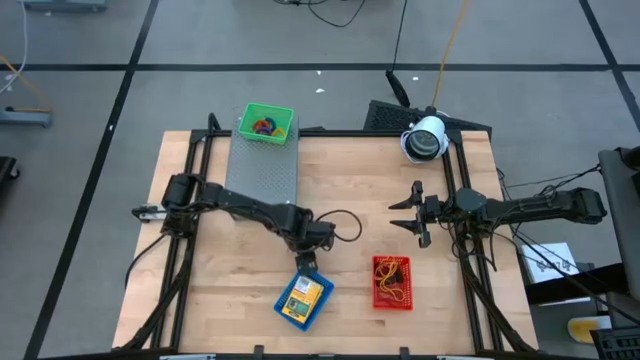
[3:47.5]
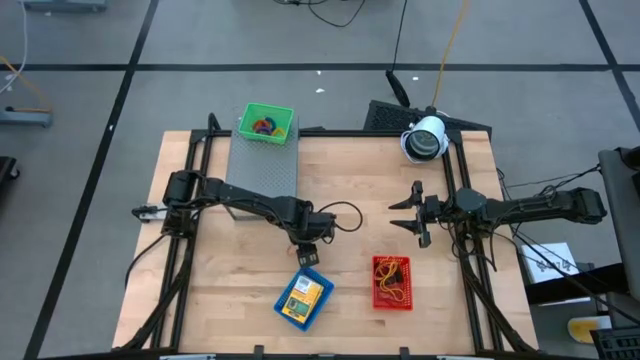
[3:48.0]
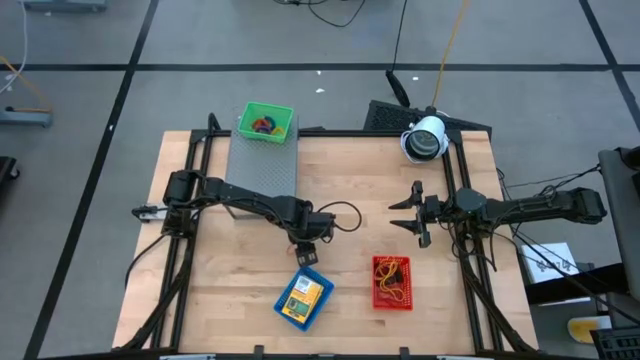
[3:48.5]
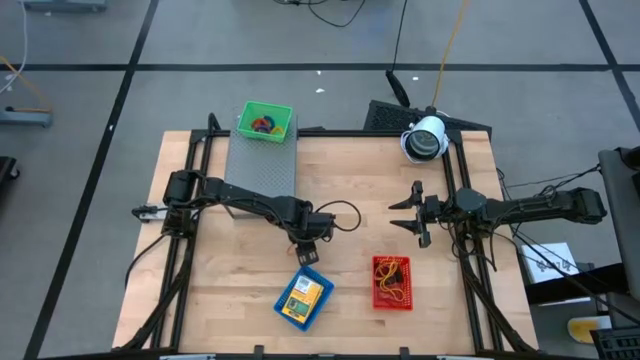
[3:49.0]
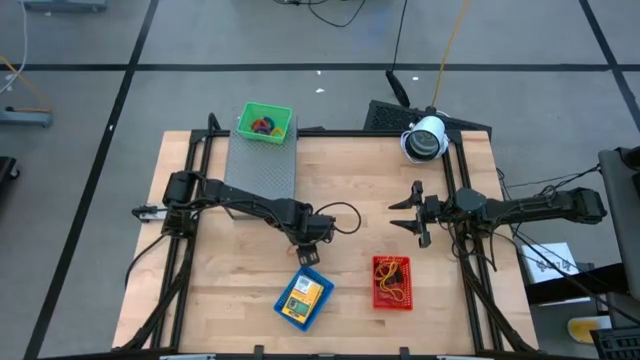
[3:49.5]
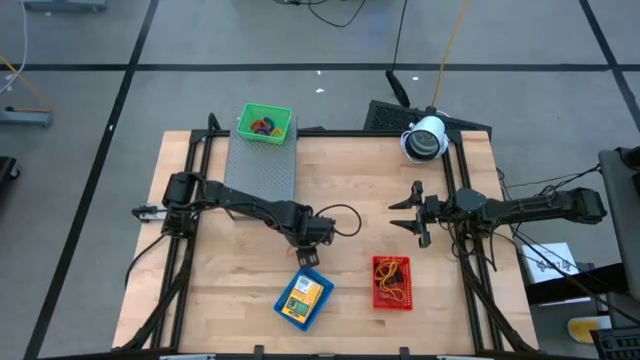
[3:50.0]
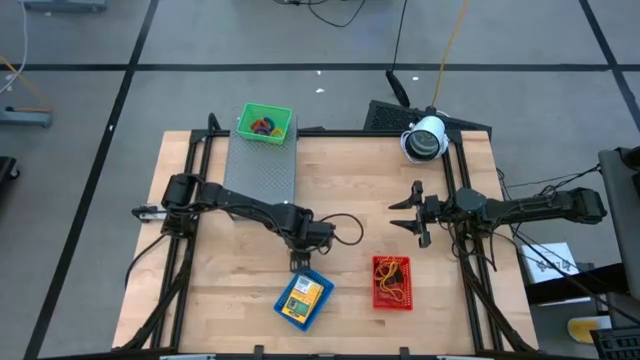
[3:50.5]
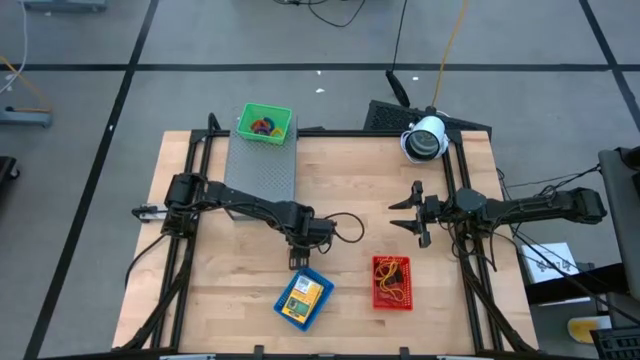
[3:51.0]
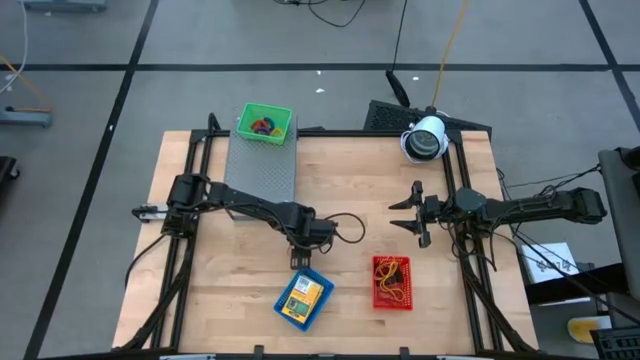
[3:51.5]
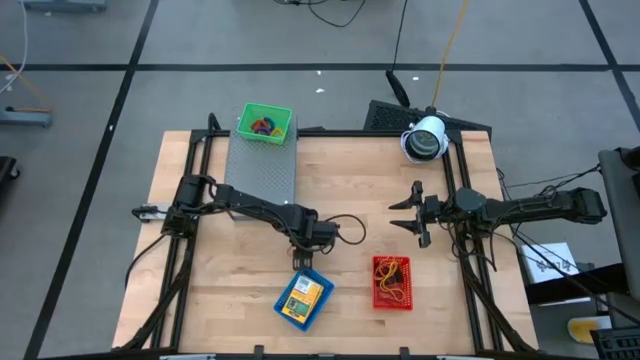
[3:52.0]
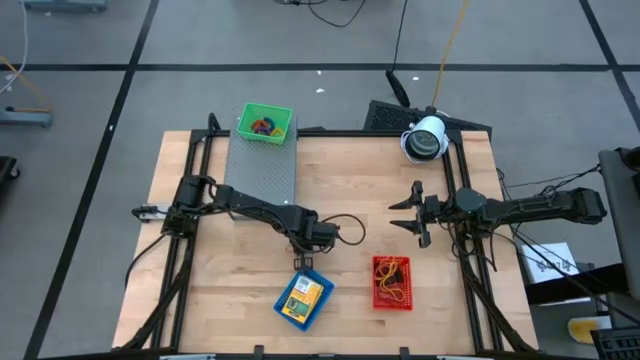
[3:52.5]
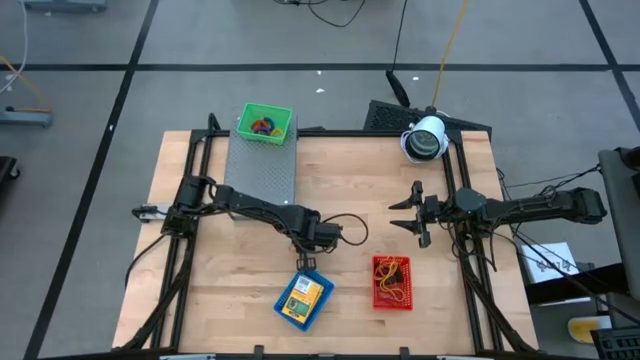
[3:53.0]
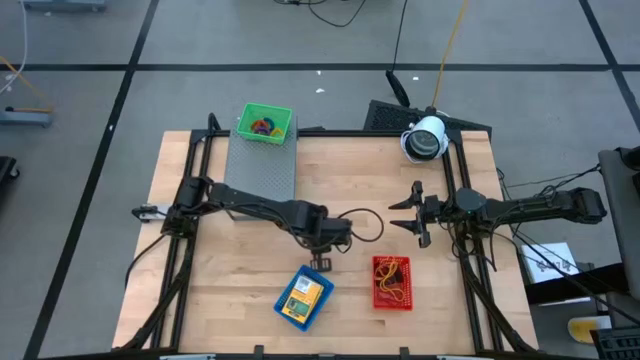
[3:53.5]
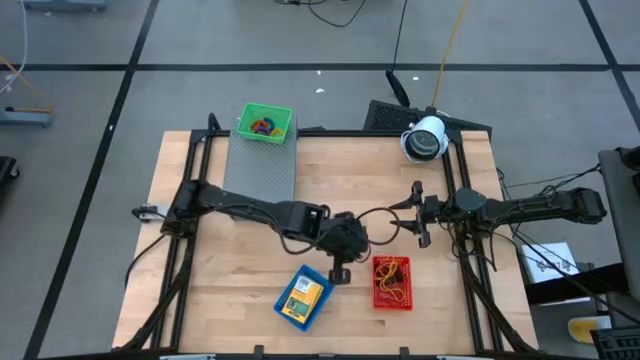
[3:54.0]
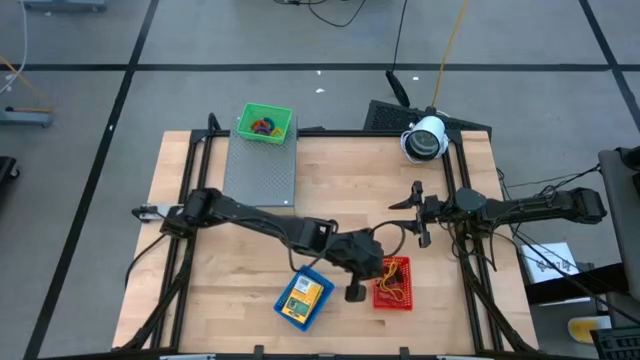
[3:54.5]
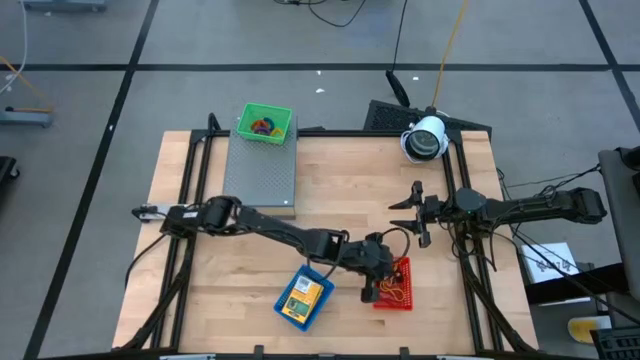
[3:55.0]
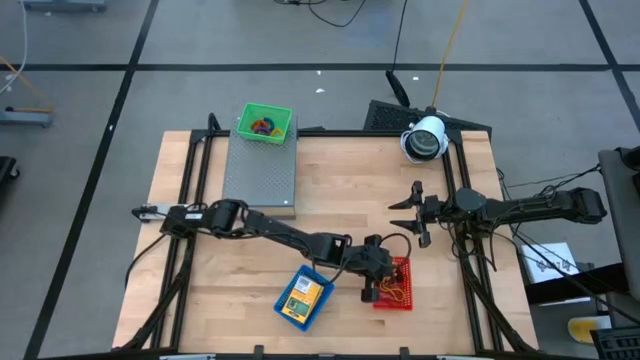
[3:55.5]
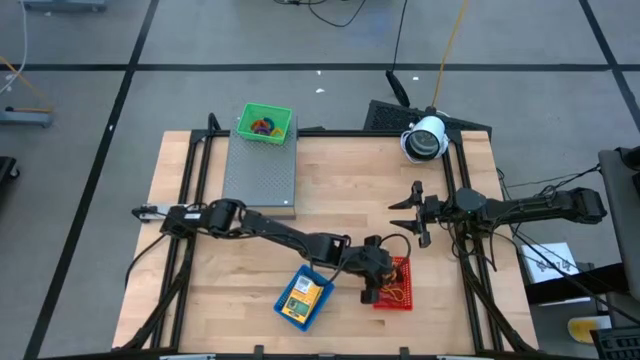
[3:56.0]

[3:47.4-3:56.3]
Task: Pick & Place Office Desk Supplies
Put the orange rubber band into the right red bin

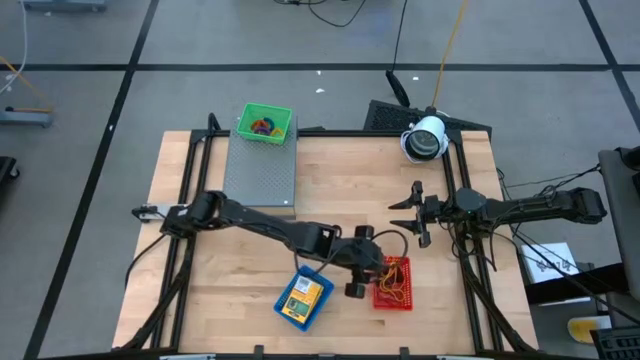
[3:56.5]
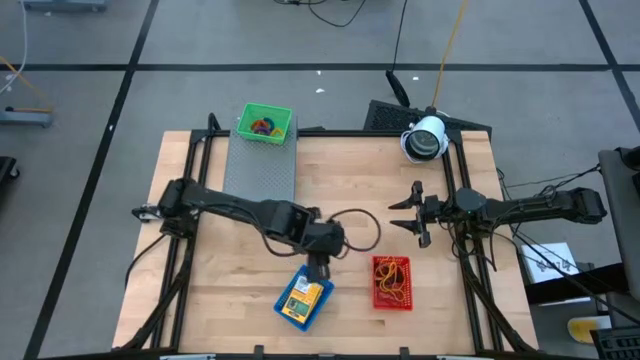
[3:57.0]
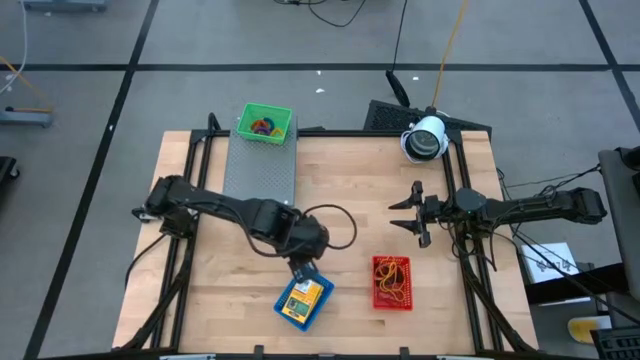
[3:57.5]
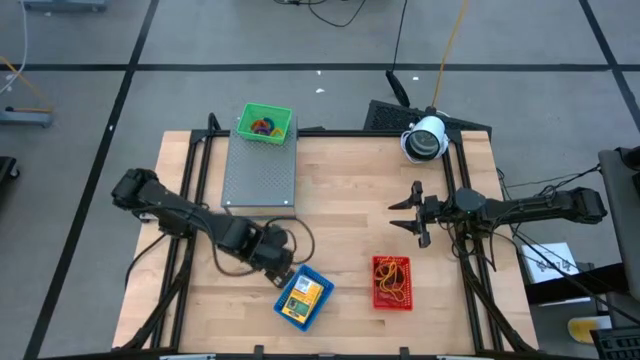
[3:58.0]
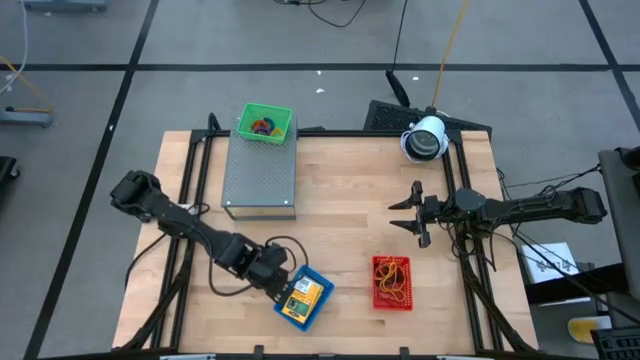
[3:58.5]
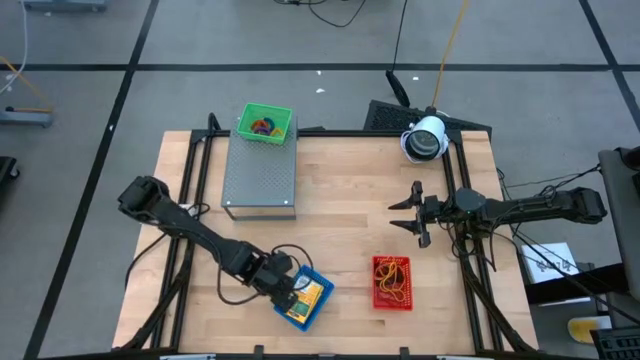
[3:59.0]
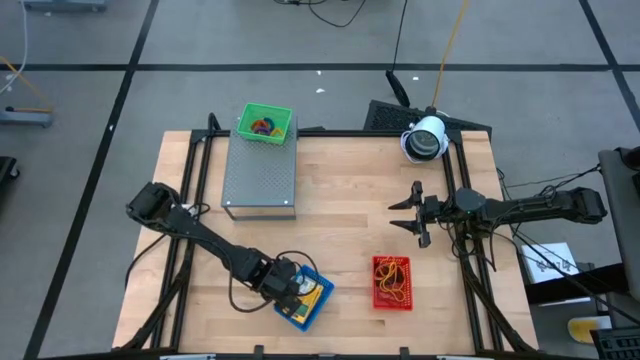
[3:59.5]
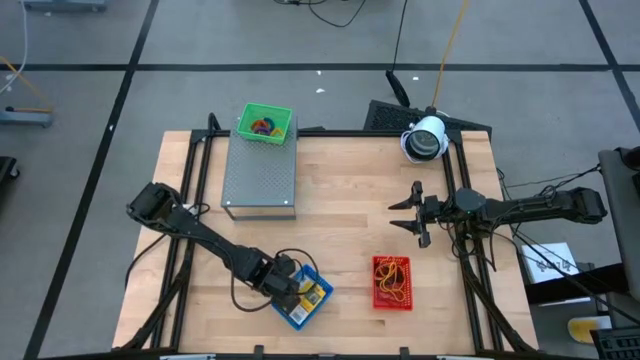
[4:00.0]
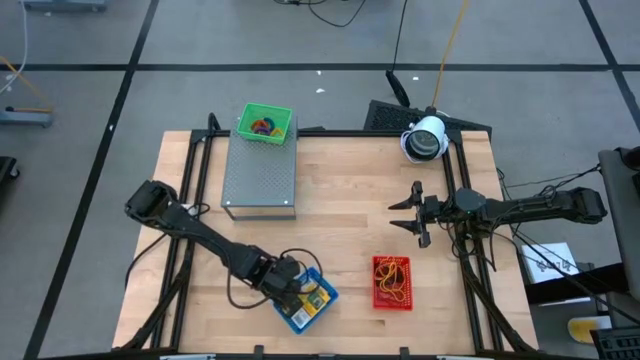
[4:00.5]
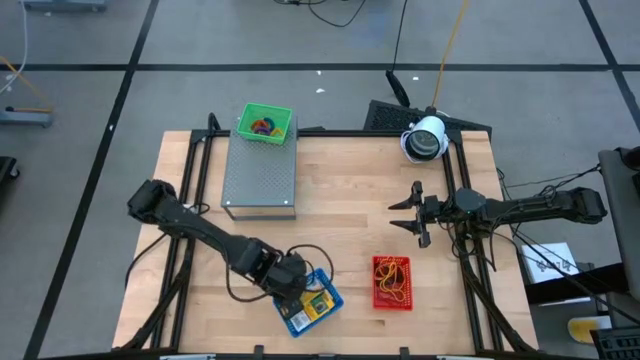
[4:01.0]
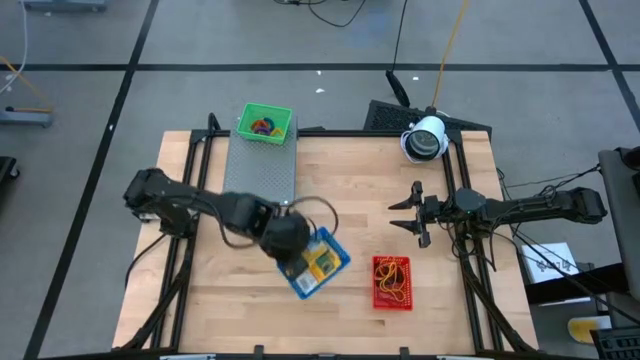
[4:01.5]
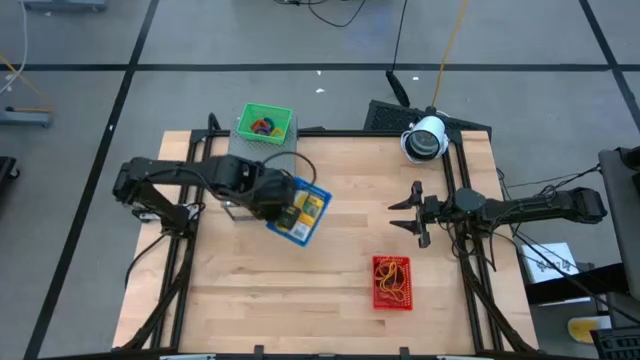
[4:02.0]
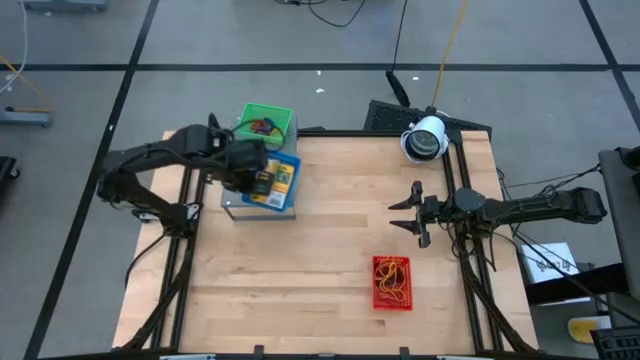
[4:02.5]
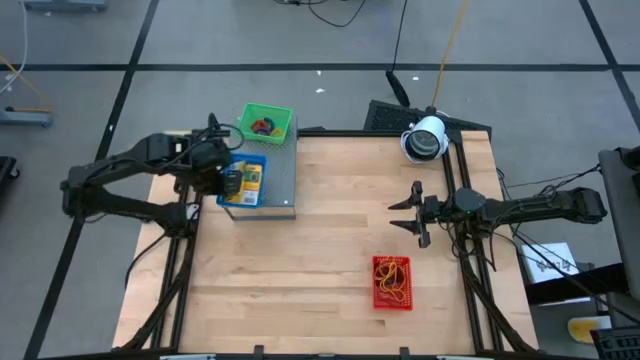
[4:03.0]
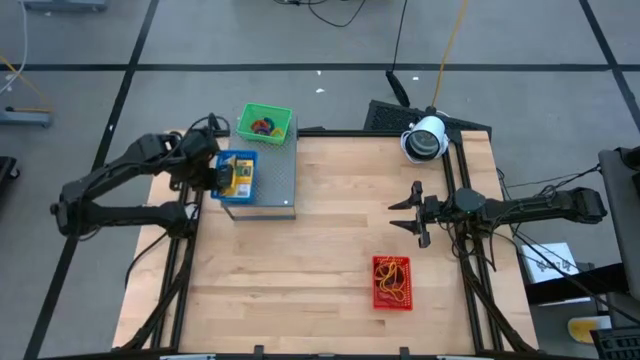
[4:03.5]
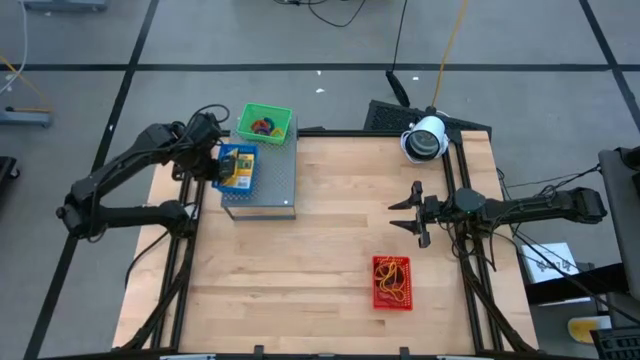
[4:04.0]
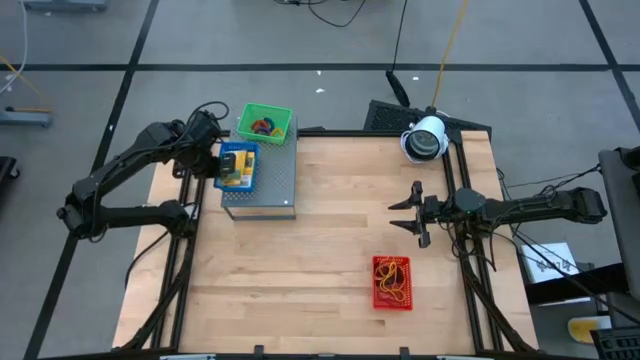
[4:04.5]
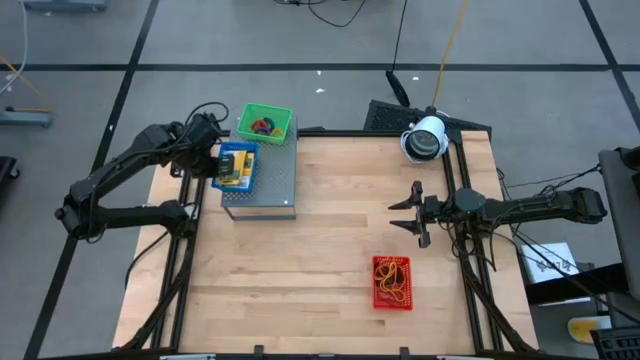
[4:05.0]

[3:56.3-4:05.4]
Put the blue bin on the shelf with crayons

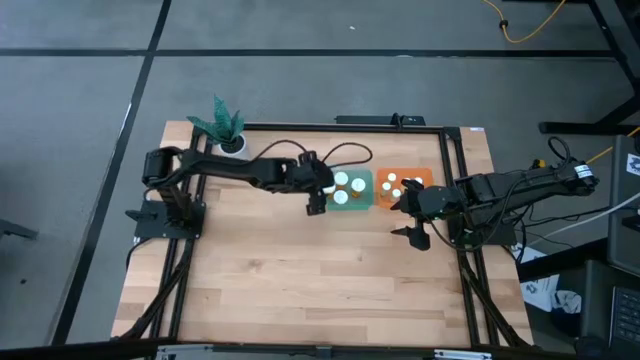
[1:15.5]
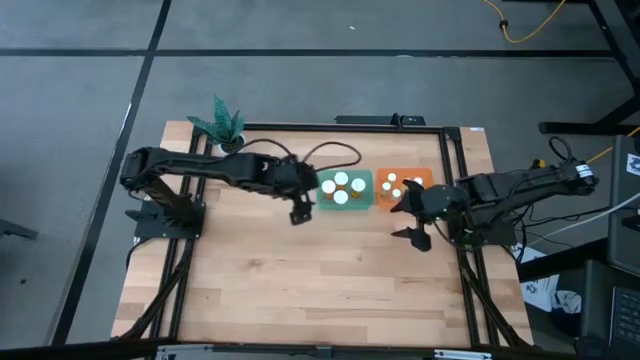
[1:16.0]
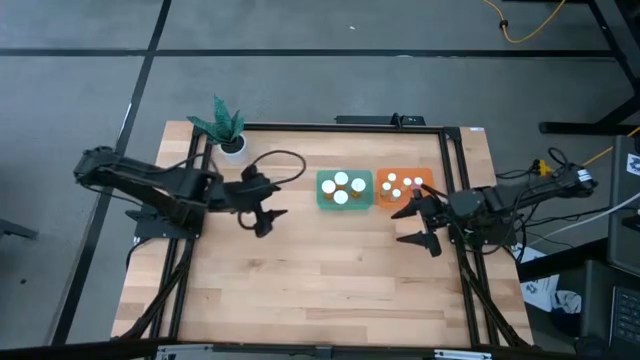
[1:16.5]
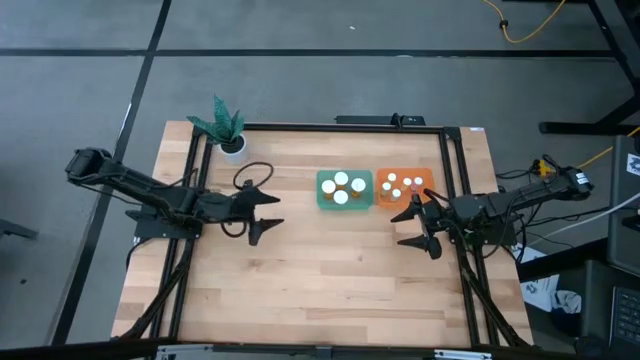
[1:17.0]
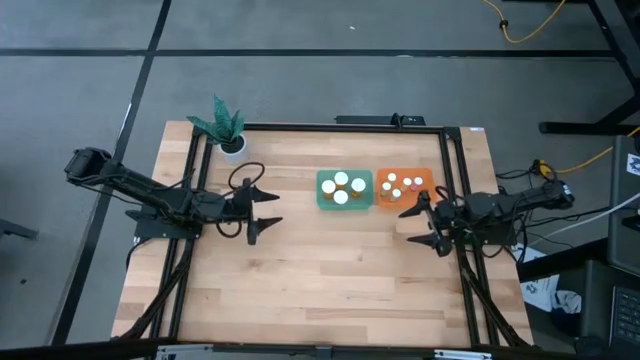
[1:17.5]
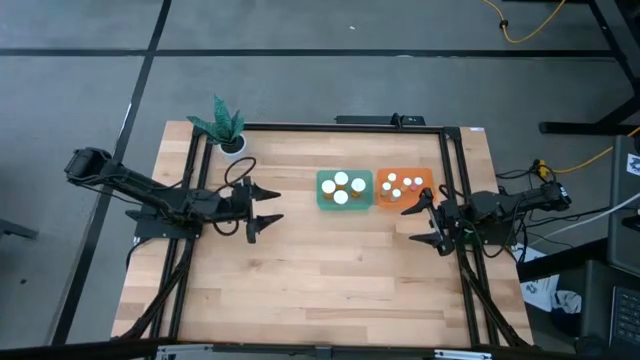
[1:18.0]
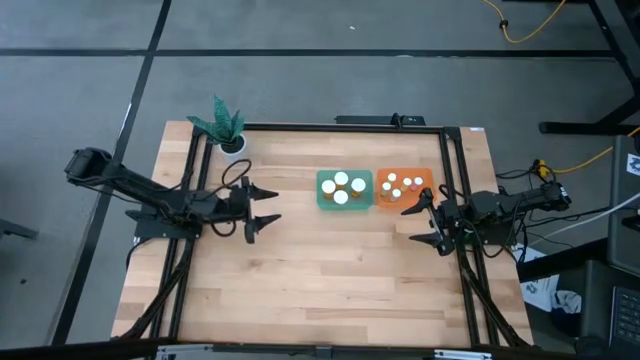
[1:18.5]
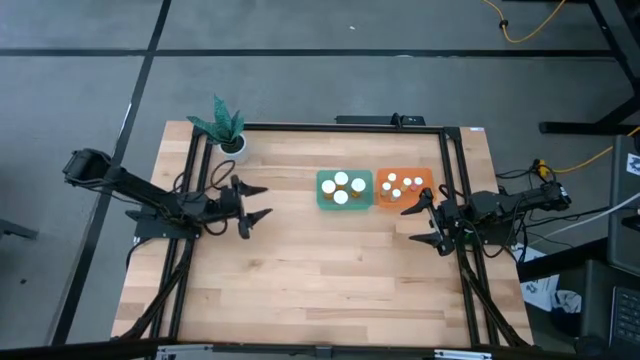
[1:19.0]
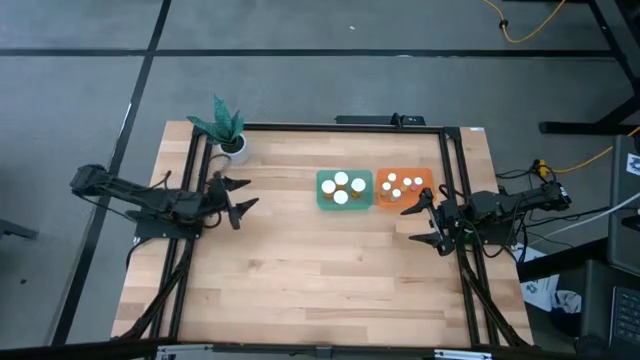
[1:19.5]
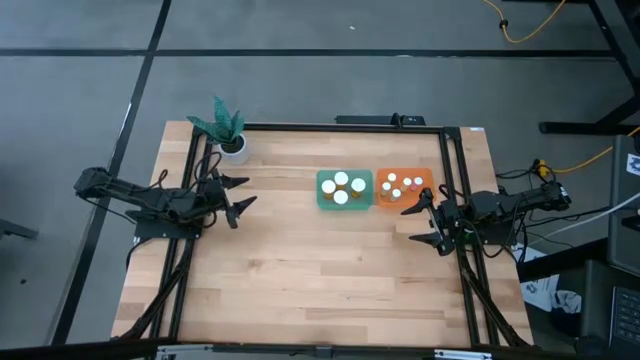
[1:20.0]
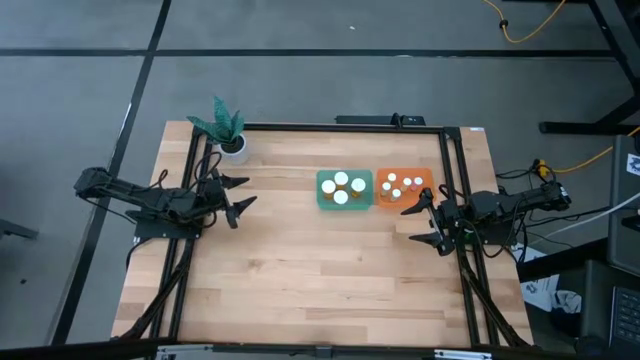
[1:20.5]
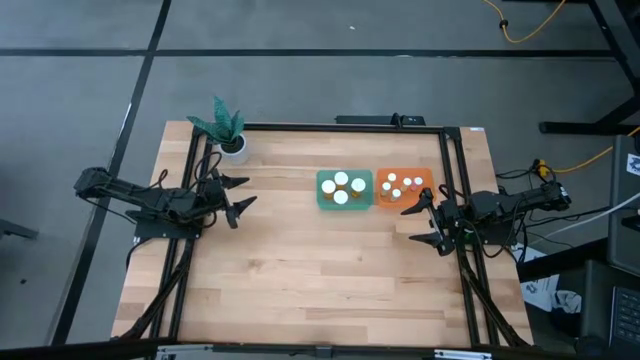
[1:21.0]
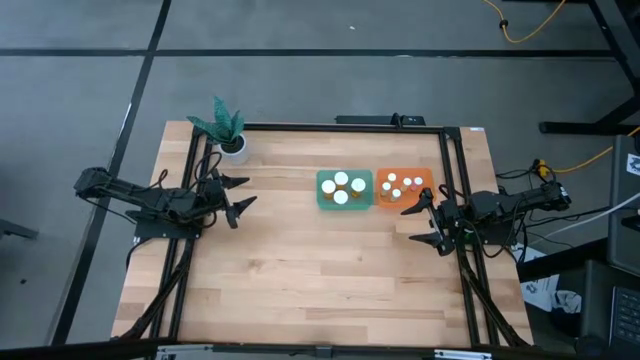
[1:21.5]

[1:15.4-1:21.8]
Task: Pick and place medicine bottles into bin by pill shape (circle, oval)
Return to Home Position
